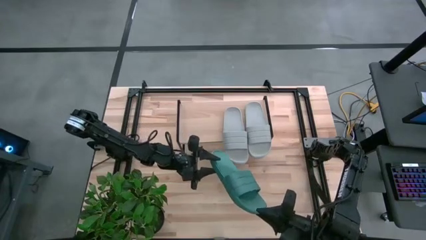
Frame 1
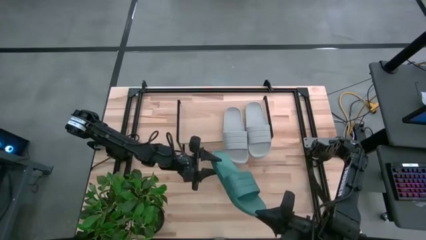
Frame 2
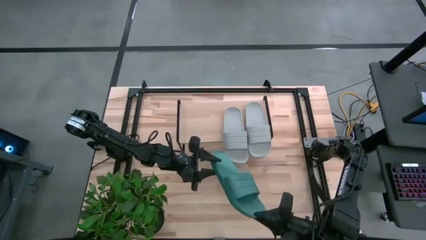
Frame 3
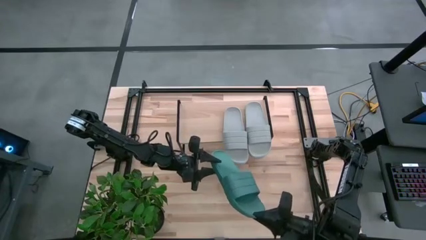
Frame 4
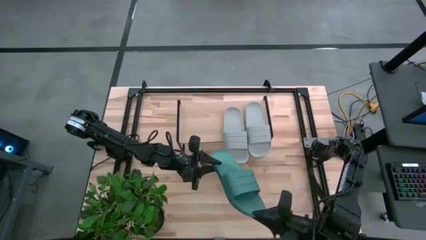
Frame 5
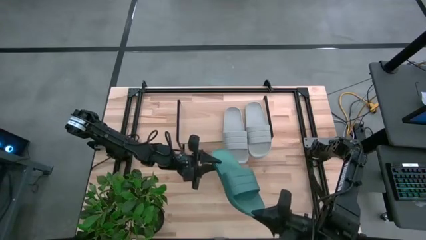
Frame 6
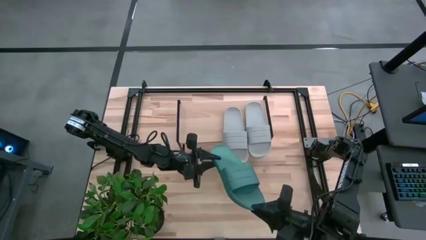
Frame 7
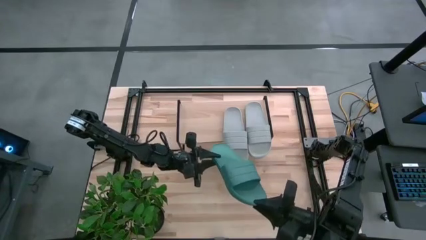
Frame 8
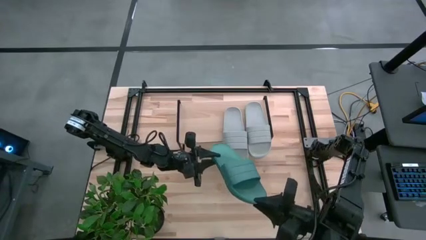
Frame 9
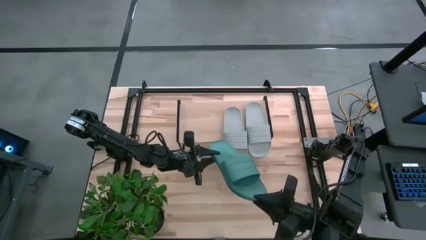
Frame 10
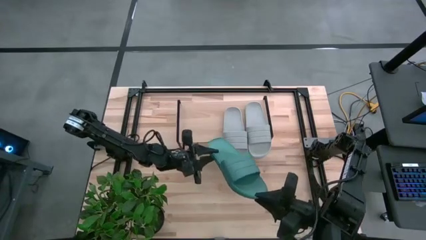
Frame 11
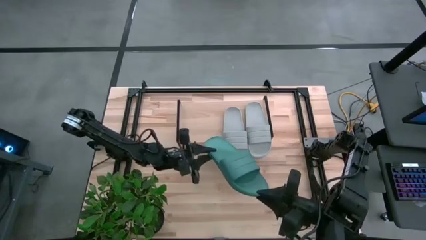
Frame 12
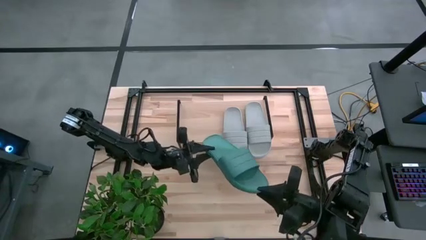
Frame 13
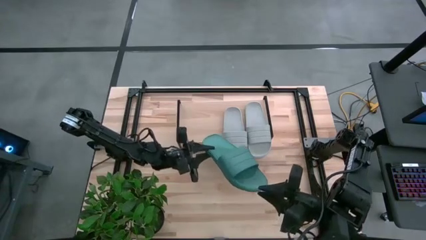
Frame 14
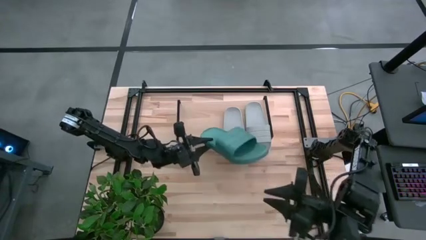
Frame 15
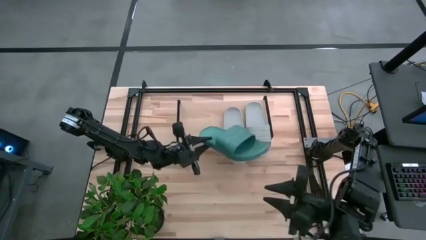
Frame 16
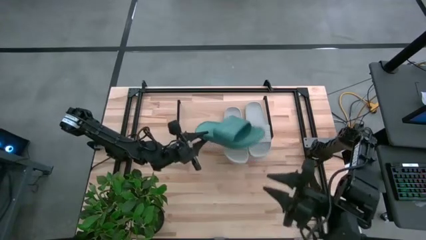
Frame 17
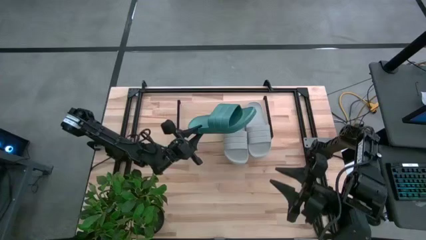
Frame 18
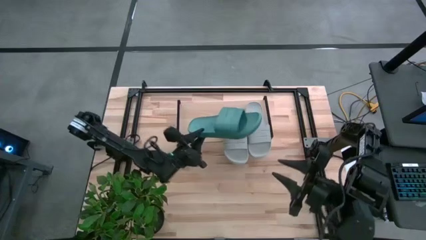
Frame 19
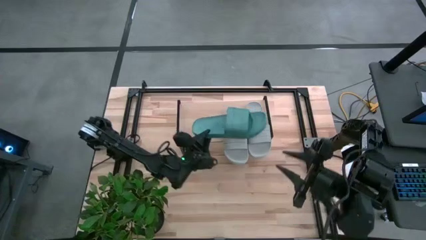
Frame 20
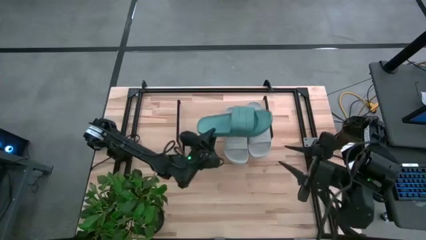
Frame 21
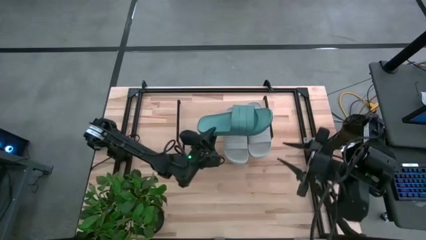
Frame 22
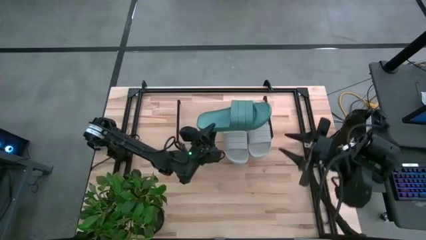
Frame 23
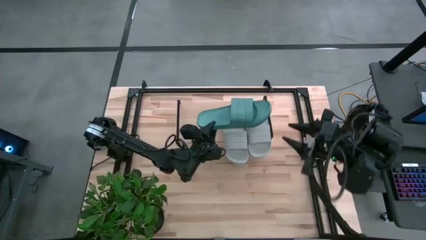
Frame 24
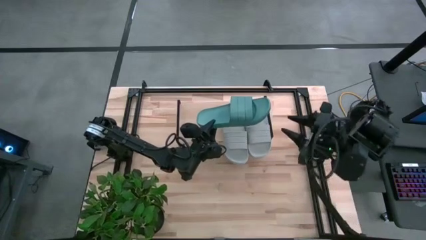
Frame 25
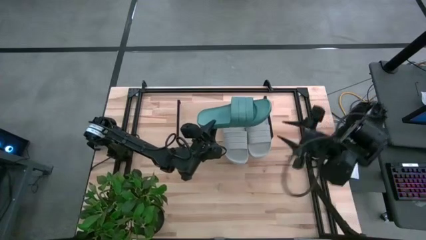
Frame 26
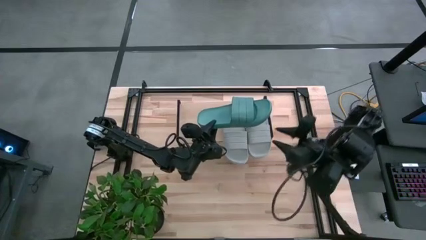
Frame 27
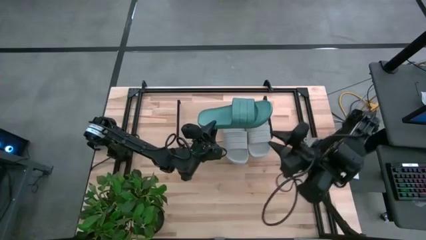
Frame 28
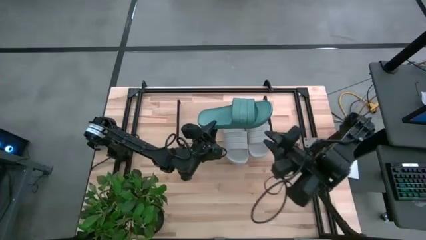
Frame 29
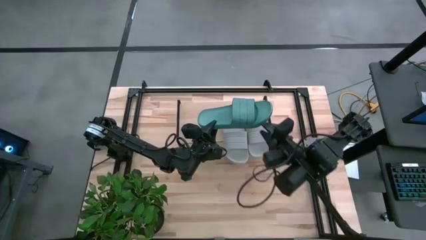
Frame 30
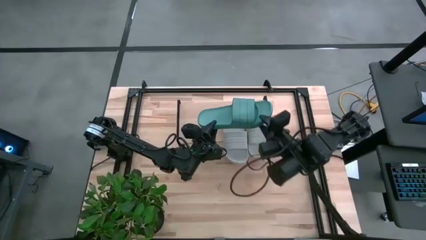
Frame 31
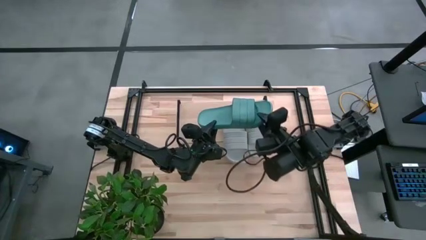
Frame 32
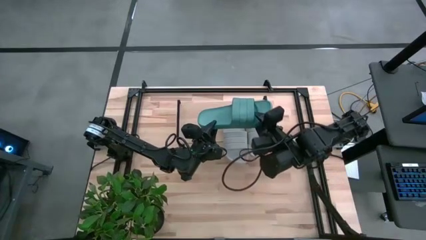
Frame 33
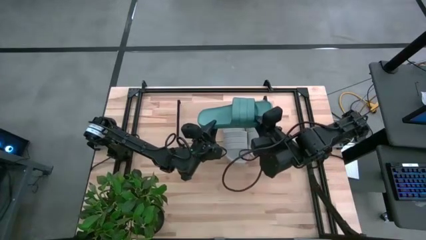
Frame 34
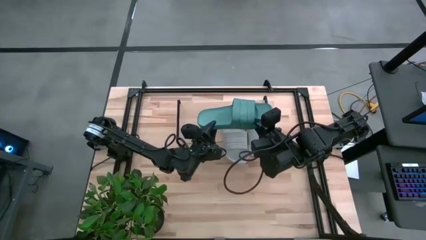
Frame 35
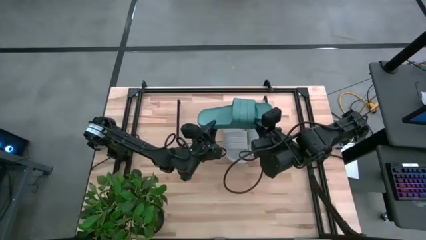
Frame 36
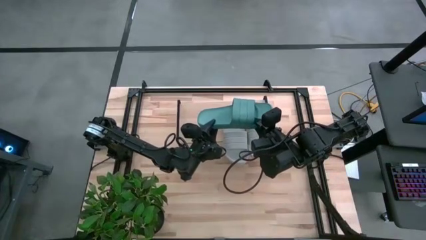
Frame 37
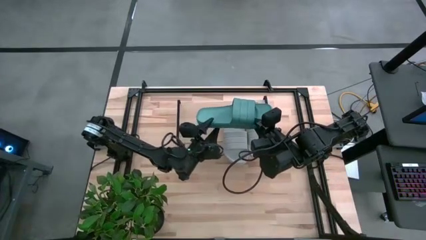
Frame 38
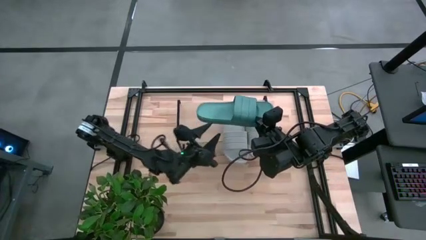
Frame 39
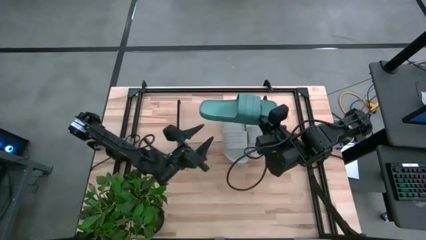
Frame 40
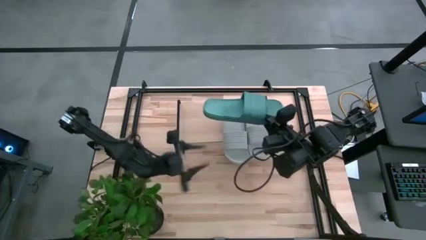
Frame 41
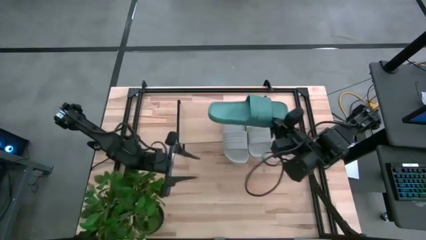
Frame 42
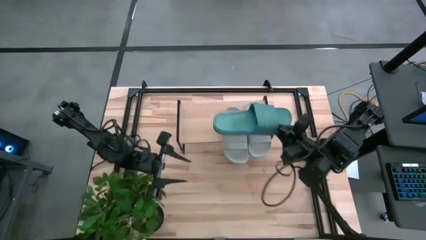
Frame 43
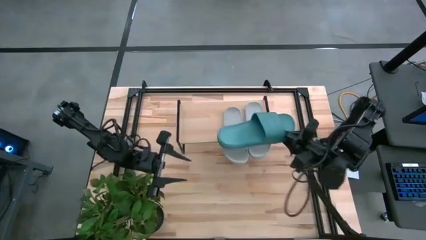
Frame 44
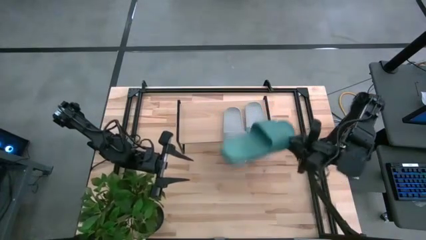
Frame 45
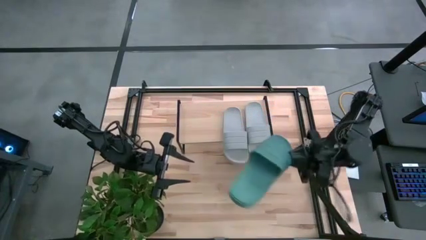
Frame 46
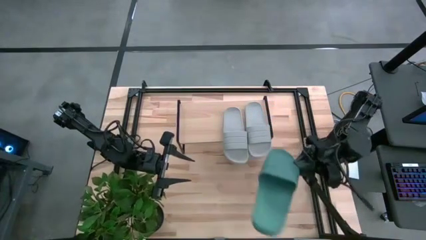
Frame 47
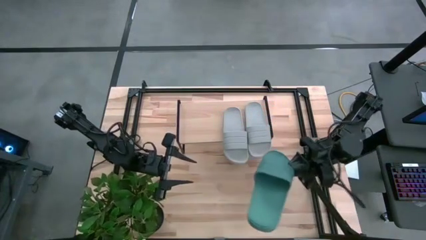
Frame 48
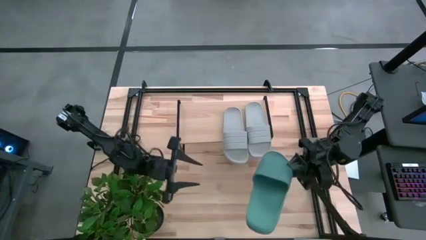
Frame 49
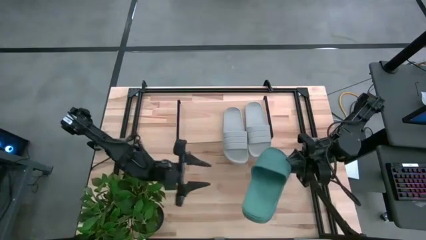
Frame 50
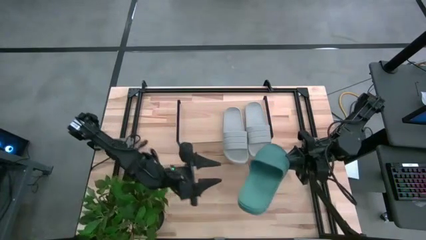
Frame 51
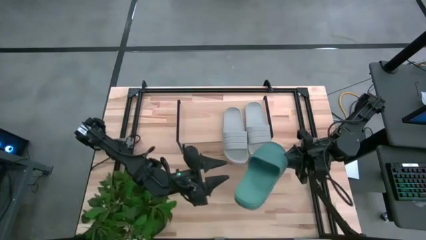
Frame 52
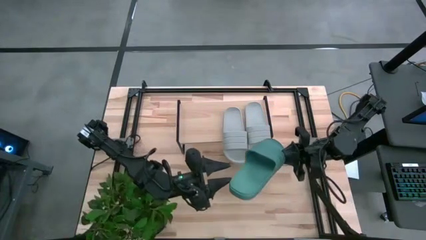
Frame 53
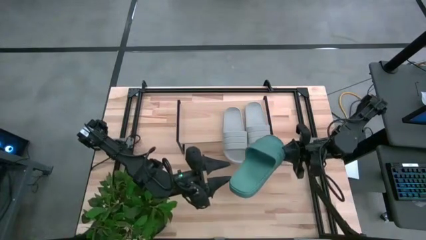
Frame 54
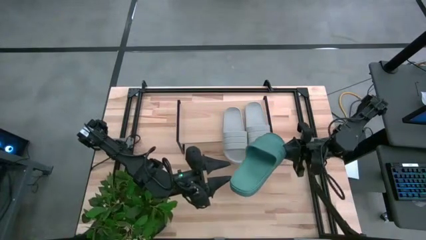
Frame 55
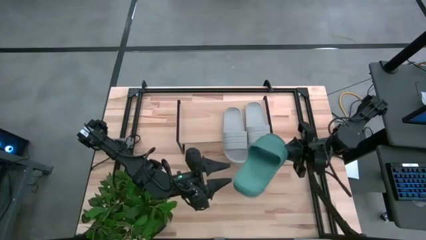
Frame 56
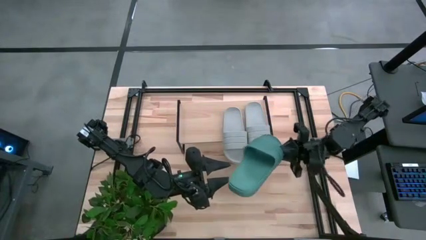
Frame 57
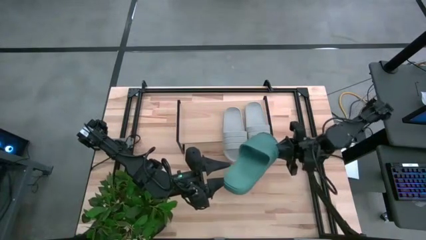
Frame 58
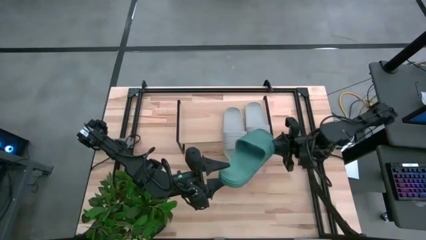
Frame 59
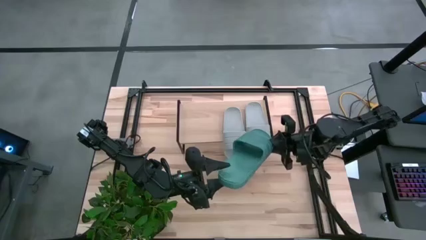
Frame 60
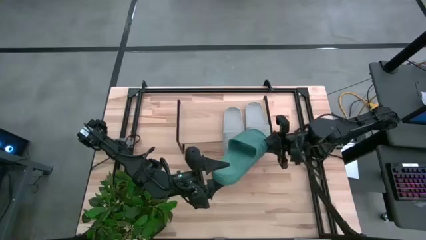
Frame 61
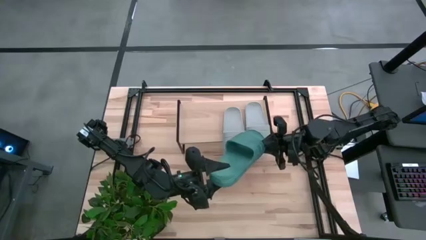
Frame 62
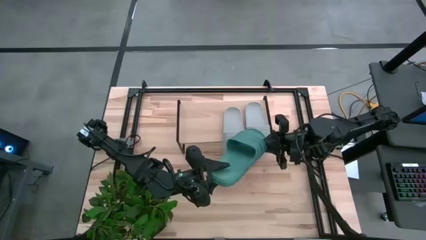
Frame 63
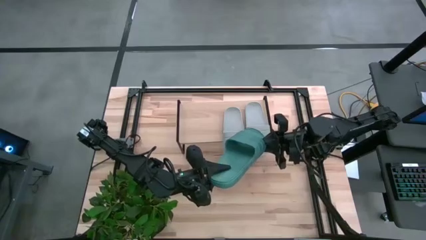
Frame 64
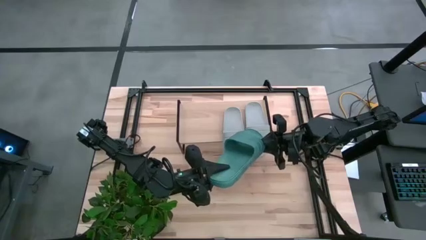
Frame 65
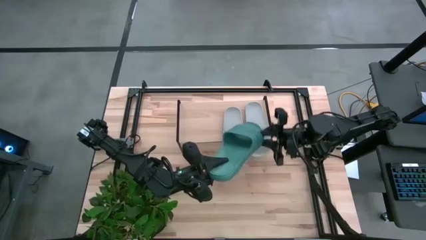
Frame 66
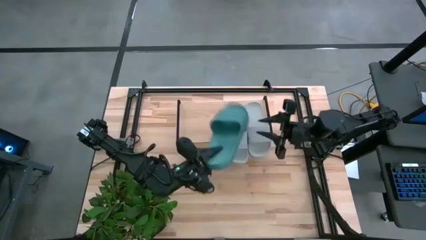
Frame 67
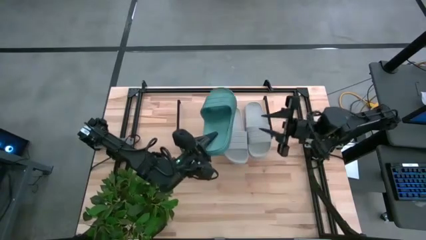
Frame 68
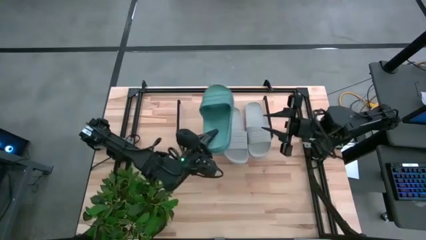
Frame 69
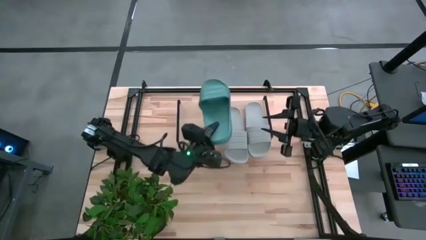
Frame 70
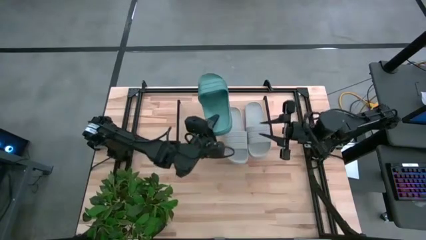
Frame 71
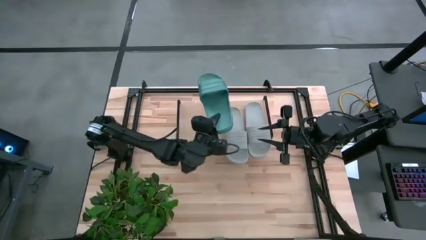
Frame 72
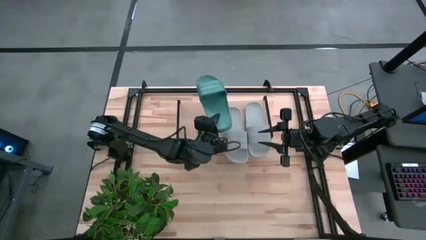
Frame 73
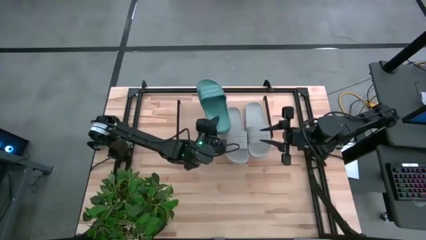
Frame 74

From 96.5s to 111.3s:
Task: Pick and place slides into the shelf
Put the left green slides on the shelf

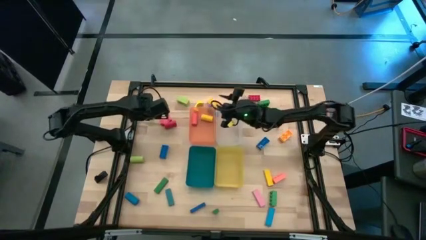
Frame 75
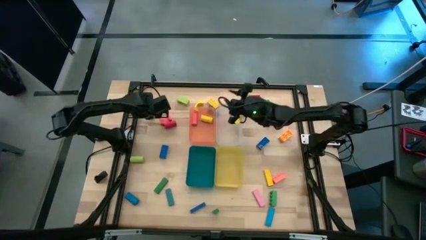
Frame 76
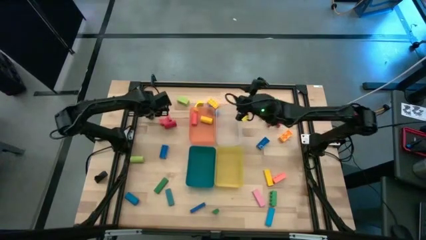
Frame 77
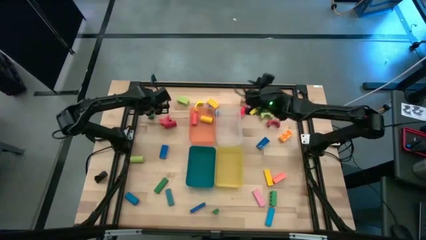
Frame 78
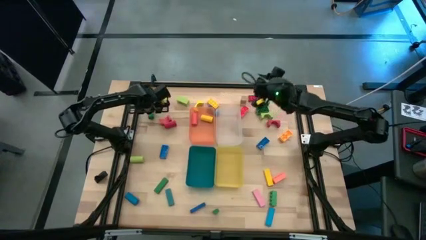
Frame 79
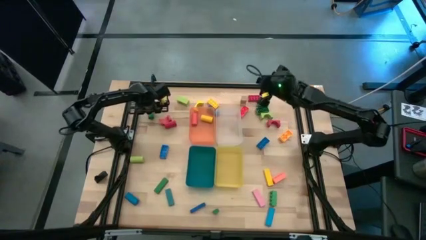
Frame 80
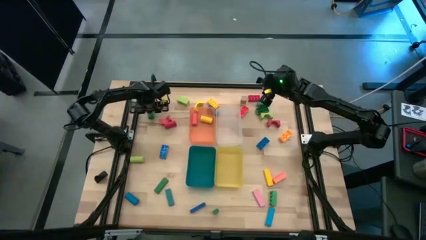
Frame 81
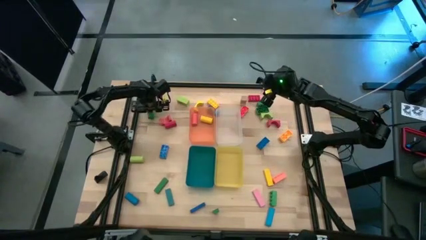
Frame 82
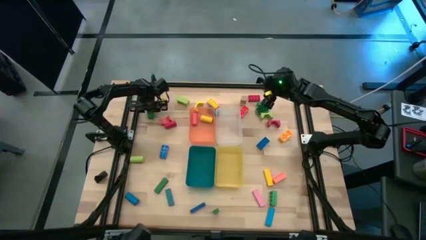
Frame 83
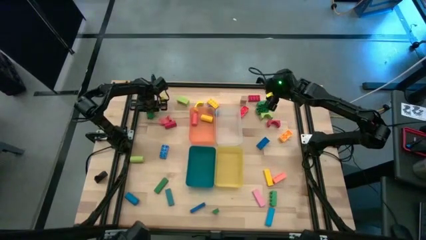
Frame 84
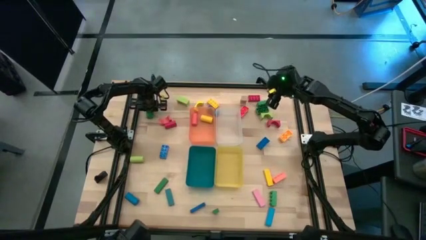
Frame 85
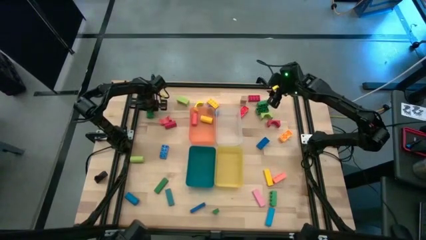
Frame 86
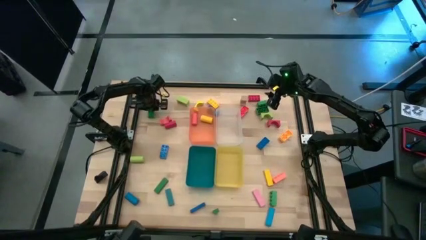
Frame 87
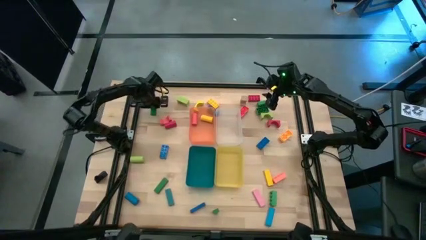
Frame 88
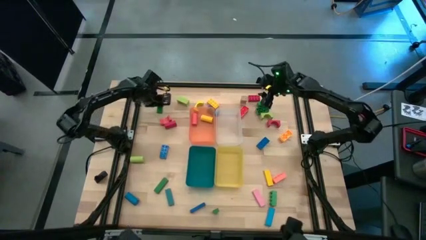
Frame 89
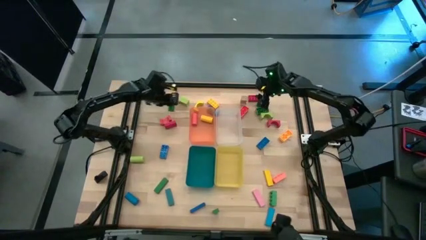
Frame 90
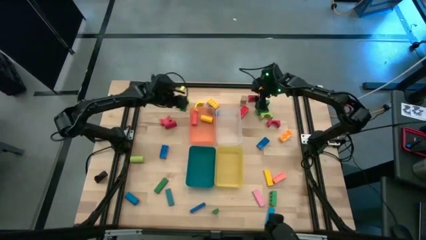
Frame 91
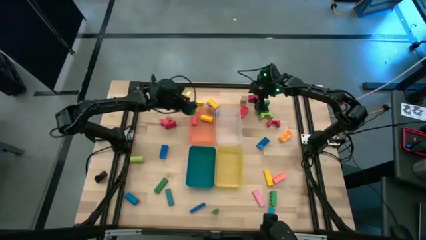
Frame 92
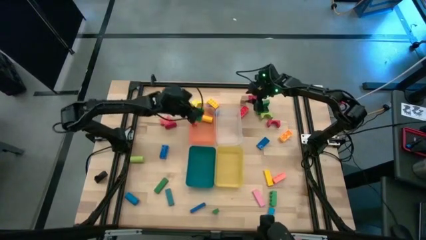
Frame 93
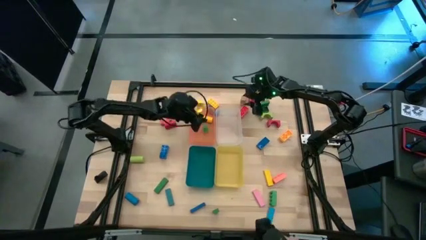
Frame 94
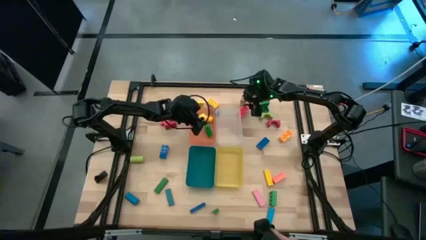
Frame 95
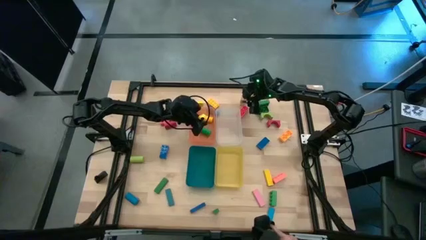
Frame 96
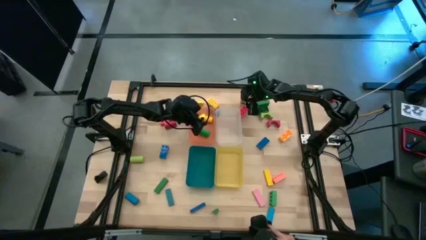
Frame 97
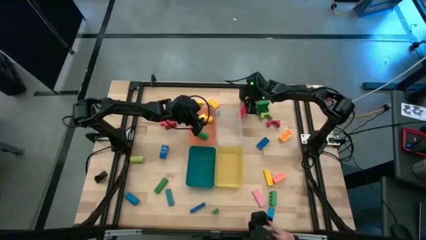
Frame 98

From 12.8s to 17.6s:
Task: Sort blocks by size
Put the green cylindrical block into the orange bin
